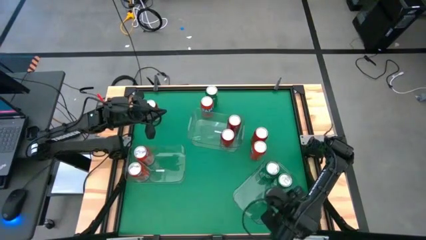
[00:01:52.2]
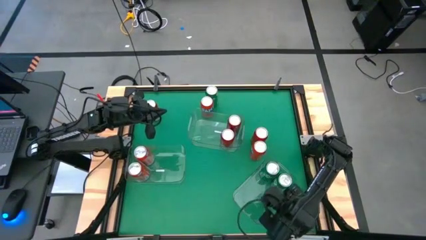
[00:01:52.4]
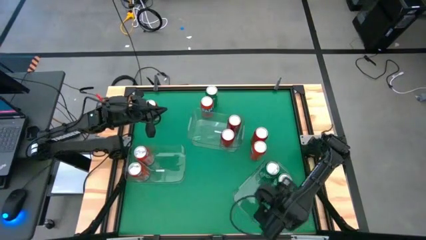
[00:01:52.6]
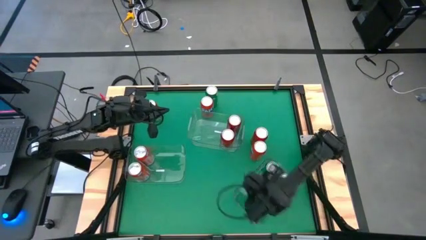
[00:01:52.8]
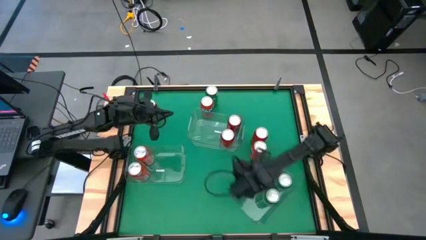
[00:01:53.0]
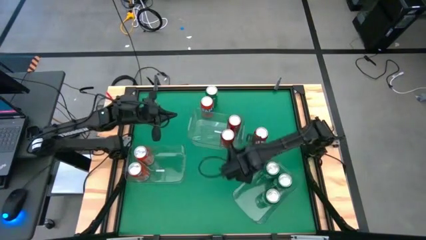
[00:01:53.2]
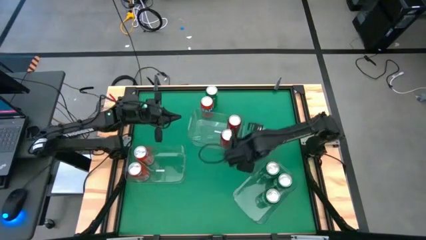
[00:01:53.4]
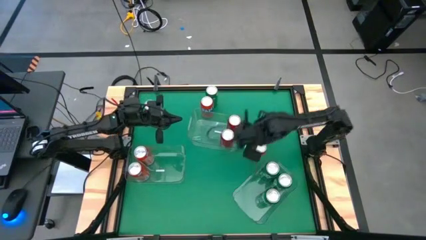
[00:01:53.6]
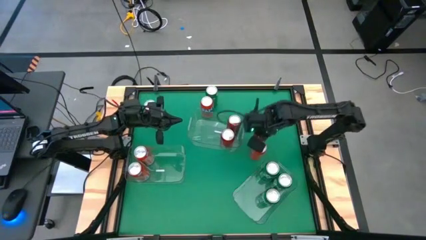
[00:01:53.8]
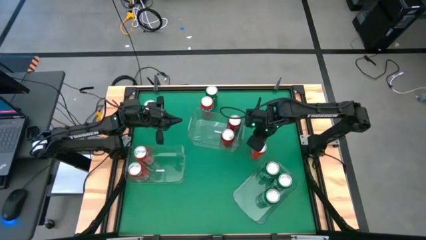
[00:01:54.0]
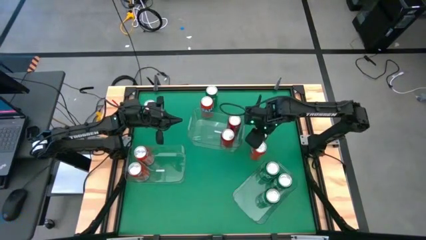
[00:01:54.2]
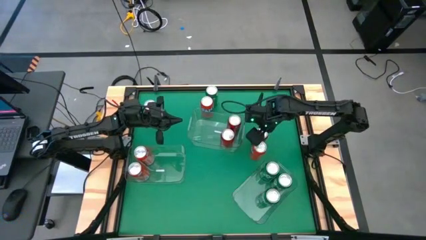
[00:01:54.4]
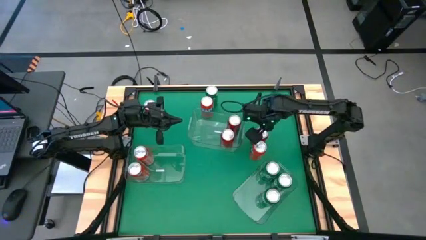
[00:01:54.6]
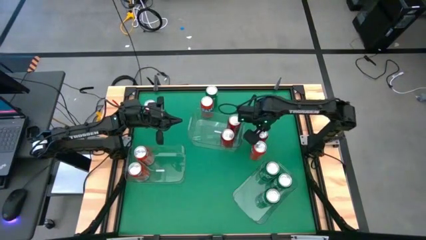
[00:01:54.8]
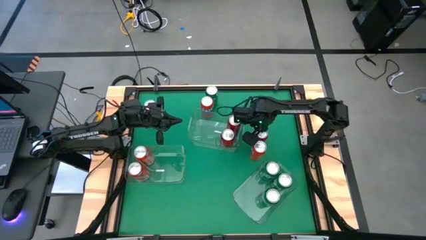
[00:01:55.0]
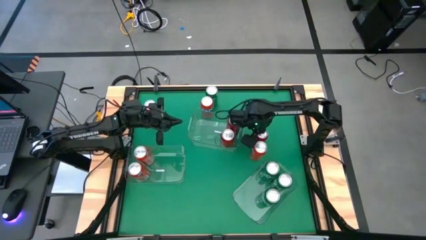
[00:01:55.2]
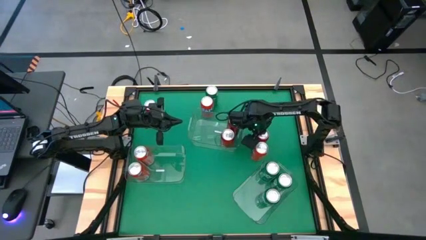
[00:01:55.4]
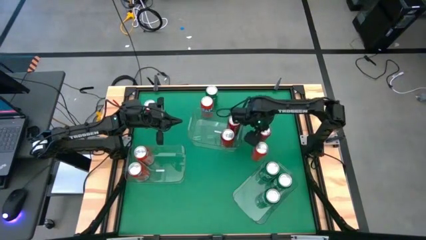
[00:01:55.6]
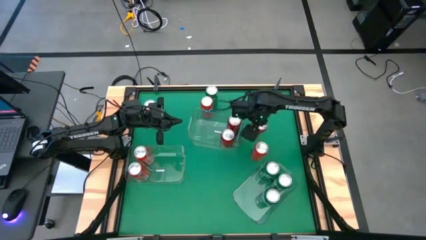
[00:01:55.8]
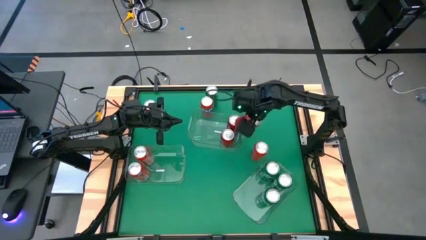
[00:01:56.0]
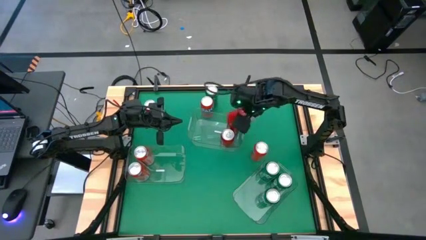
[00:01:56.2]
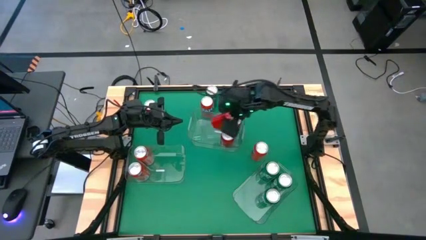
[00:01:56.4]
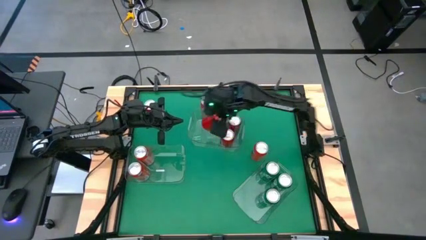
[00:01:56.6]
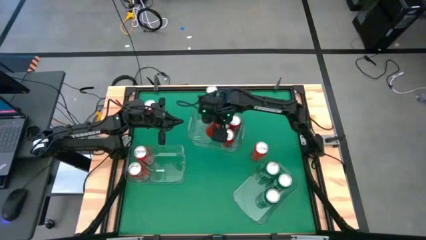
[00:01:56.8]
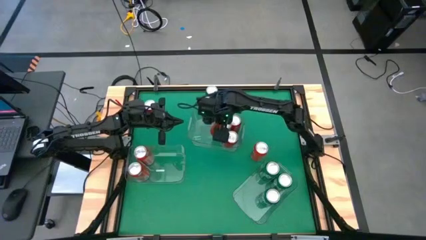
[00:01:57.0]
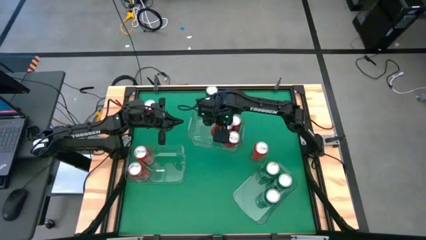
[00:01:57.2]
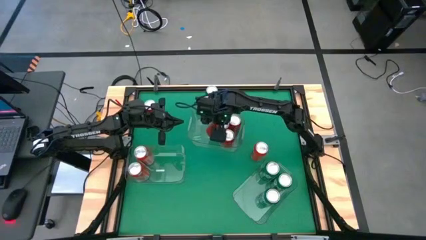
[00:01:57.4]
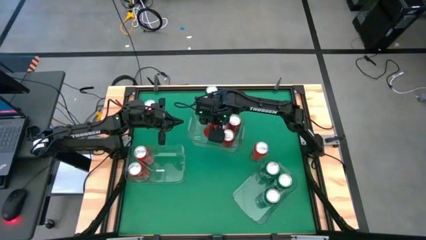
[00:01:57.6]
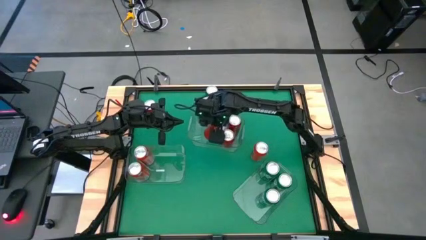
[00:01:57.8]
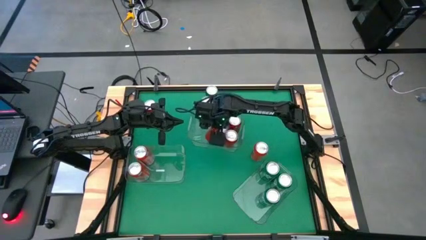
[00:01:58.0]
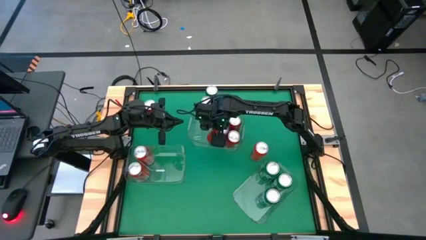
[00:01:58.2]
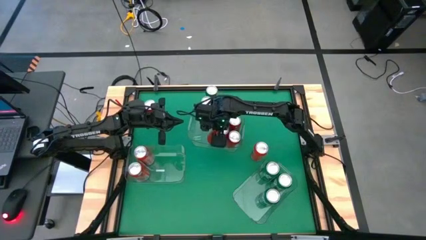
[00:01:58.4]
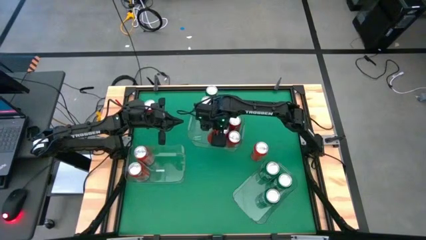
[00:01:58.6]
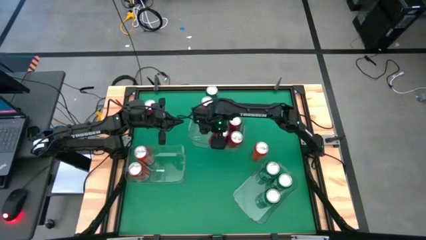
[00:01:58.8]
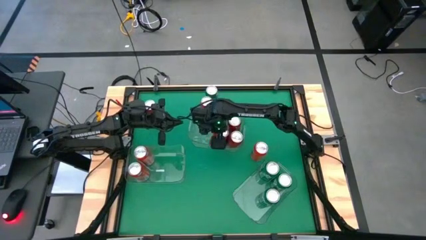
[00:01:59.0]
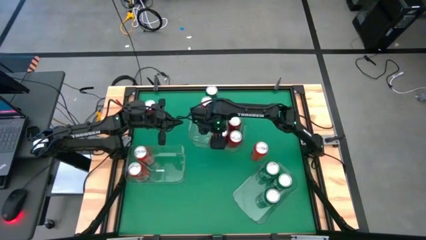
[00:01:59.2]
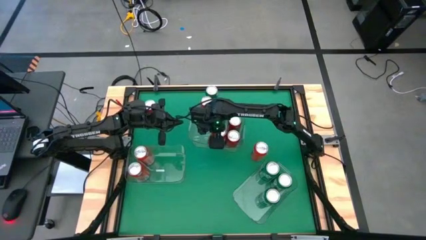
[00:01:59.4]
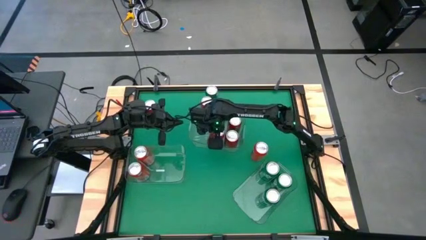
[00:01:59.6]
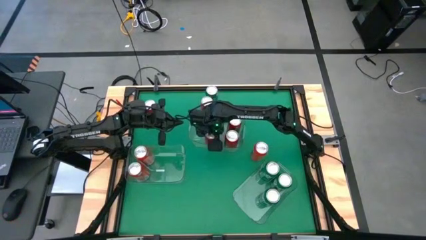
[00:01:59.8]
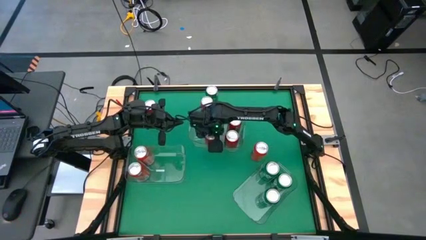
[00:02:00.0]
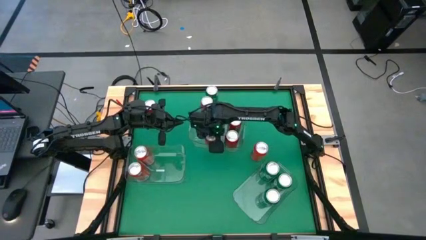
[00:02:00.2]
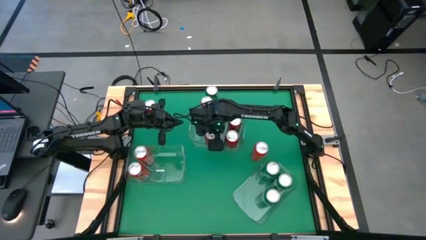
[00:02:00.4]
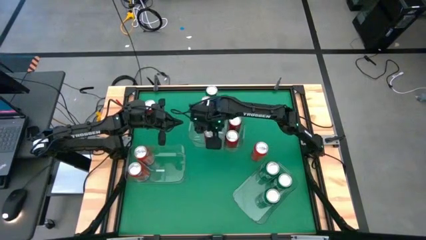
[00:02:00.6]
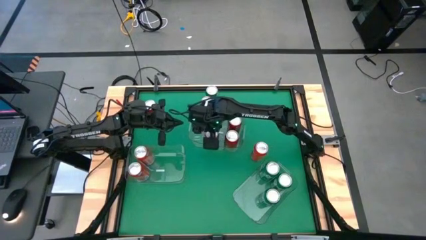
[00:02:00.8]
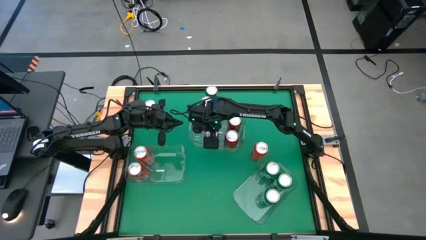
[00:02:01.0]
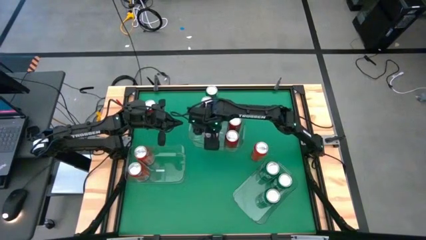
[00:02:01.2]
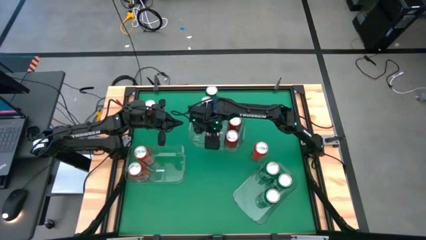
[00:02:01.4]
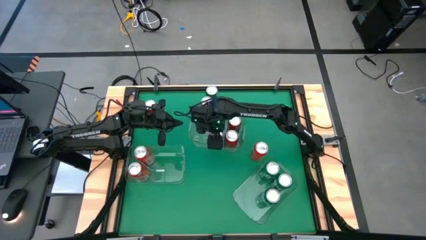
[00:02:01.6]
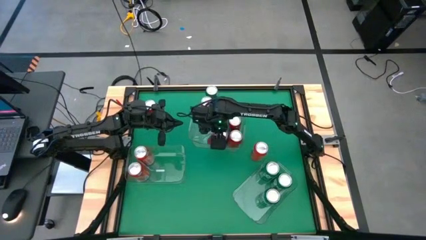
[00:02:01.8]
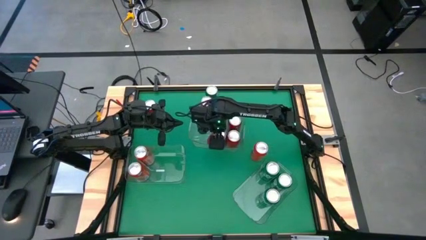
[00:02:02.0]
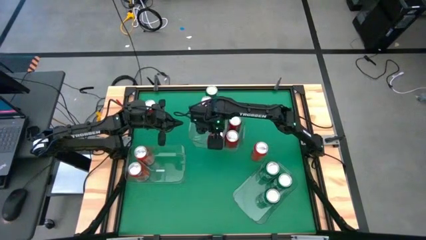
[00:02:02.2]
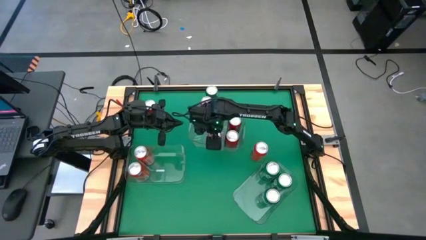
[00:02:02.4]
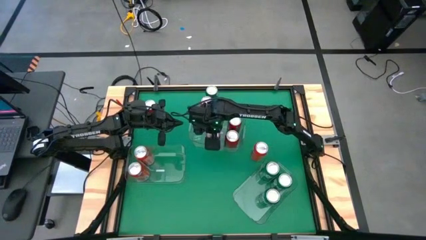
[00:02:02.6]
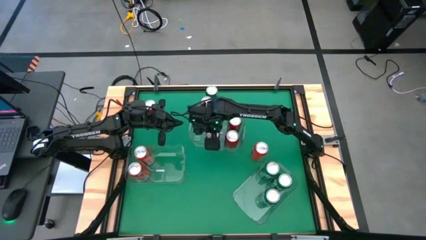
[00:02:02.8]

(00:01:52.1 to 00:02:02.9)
Task: Sort soda cans
Put the right red black soda can into the top transparent bin

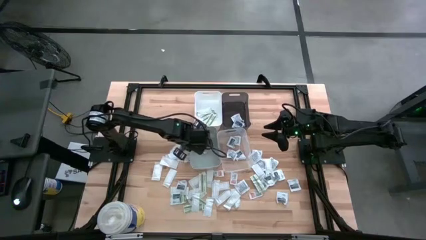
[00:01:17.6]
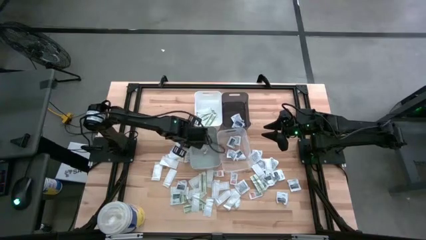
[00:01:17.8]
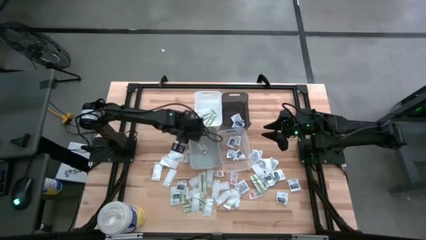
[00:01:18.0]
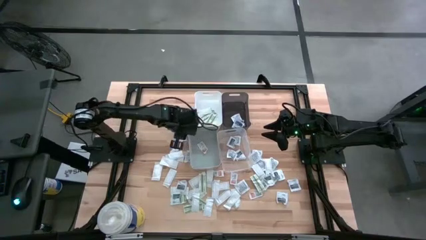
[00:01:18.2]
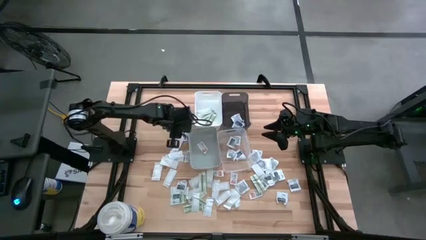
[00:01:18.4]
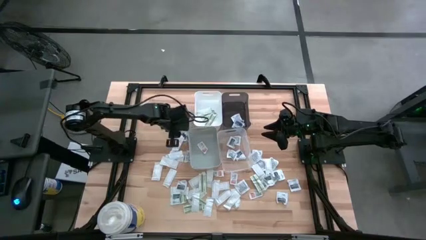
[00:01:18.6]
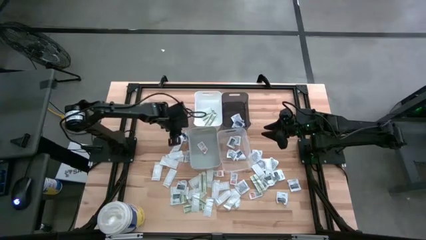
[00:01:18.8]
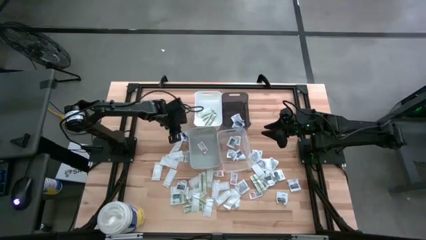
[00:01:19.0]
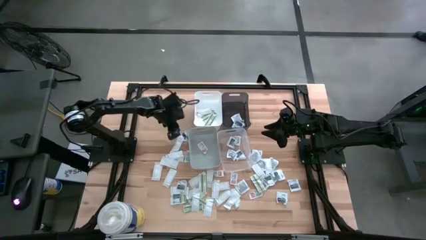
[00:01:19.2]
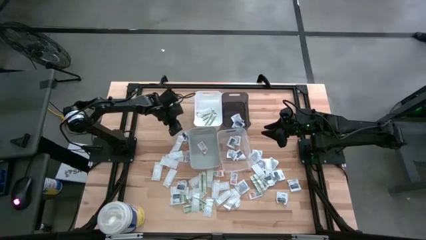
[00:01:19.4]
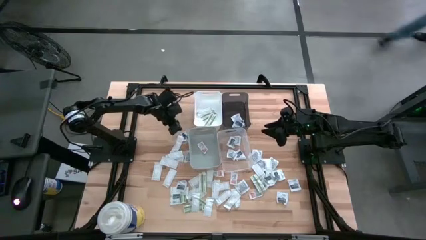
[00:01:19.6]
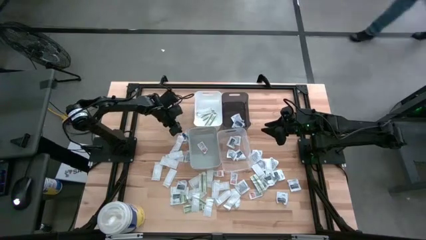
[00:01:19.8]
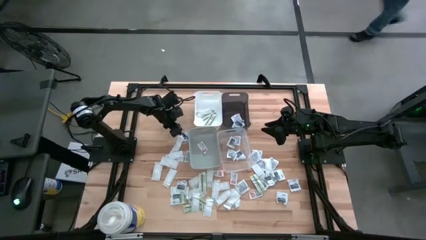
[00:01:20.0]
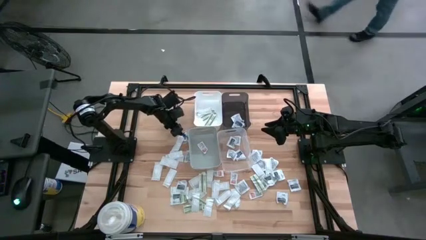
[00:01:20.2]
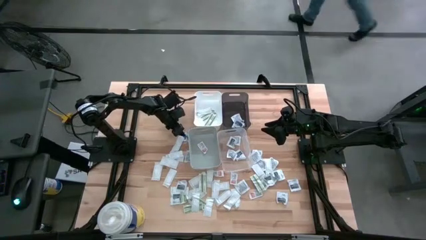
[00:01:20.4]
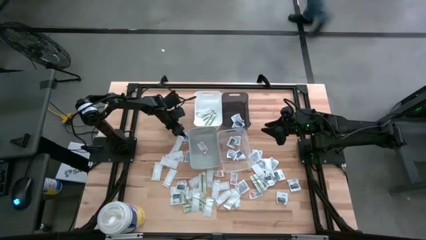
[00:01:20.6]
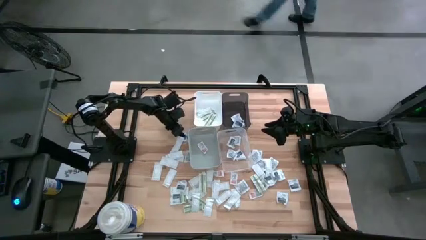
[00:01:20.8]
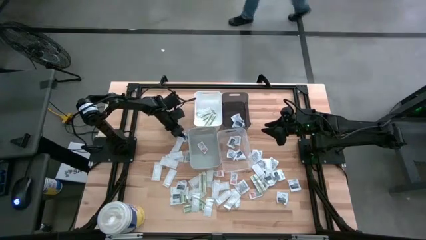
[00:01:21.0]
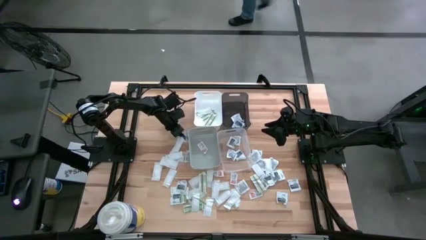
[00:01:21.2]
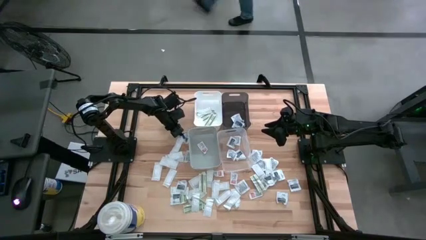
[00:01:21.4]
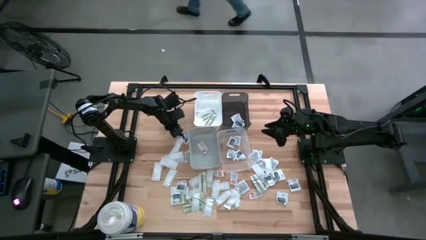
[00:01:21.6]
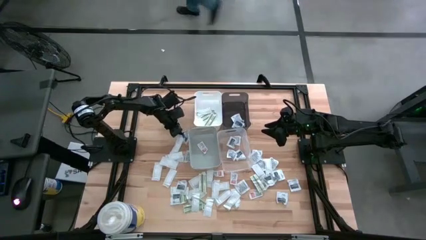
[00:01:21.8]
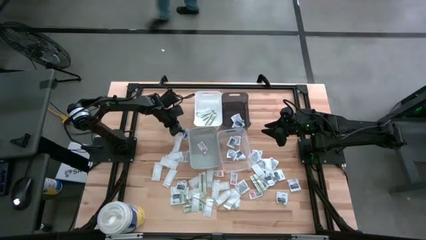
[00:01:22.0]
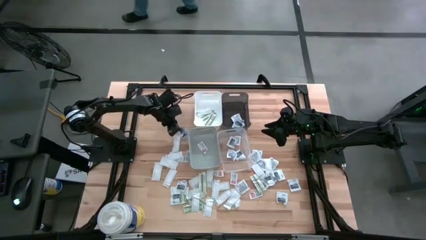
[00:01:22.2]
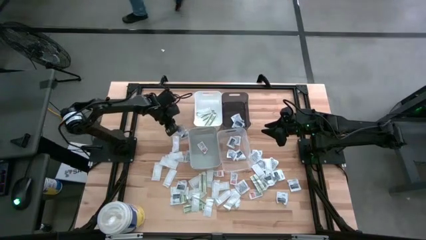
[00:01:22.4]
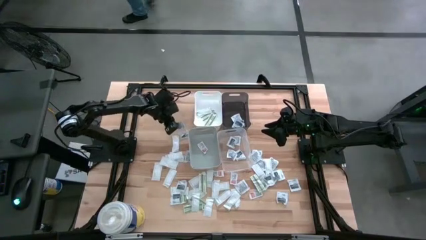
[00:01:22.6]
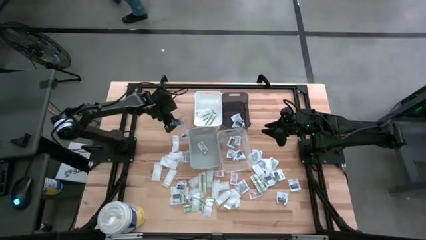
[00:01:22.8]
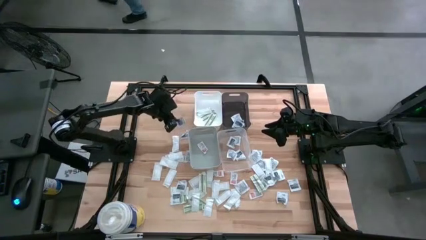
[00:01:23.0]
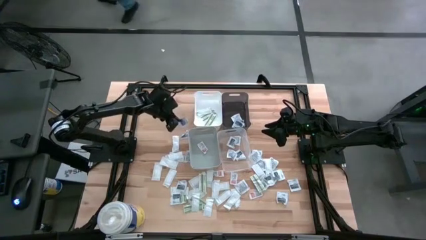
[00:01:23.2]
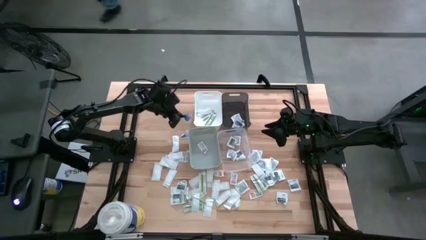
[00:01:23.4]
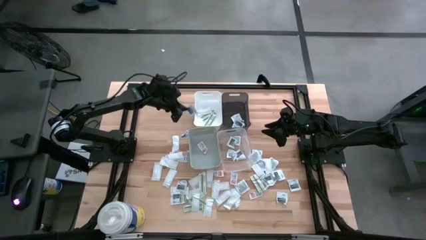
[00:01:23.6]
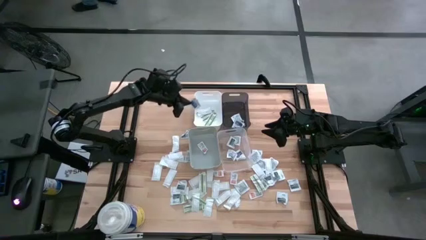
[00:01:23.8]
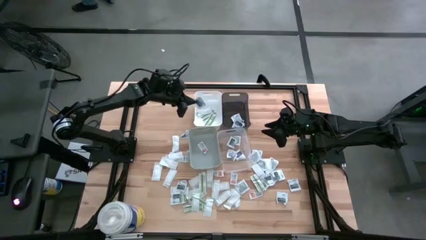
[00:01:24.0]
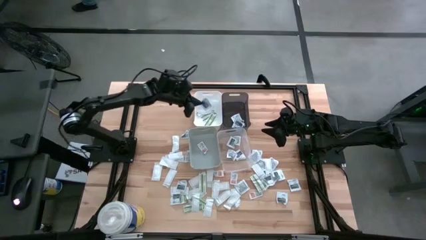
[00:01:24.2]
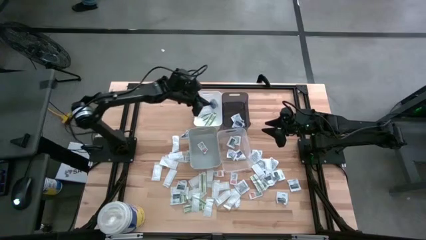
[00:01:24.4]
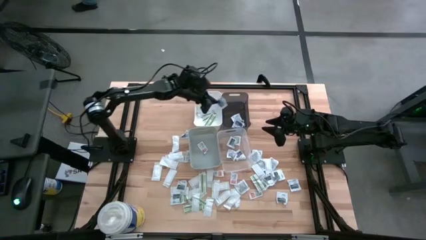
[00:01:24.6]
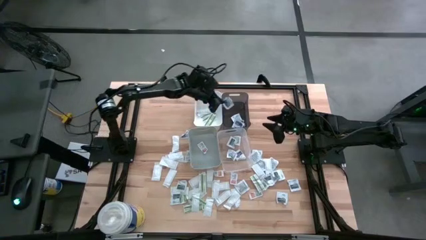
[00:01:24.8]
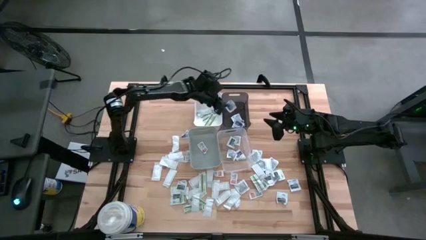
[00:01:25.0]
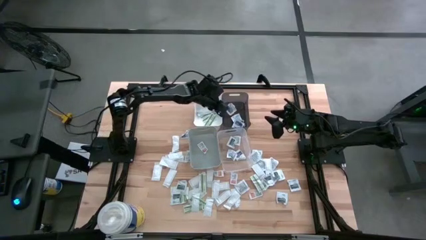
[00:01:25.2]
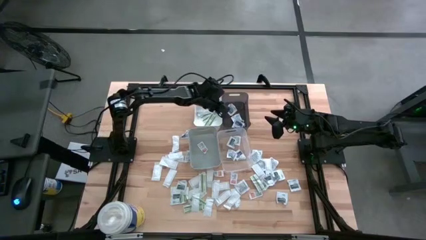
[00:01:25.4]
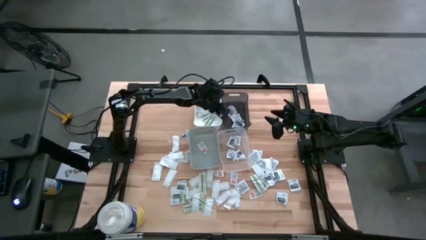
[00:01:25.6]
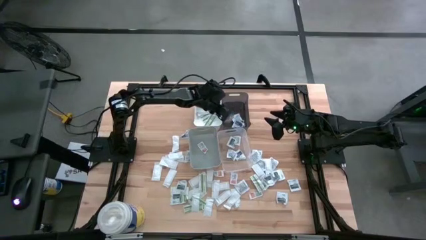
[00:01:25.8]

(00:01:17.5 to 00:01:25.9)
Task: Pick & Place First Aid Supplies
Put the blue alcohol pad into the black bin
